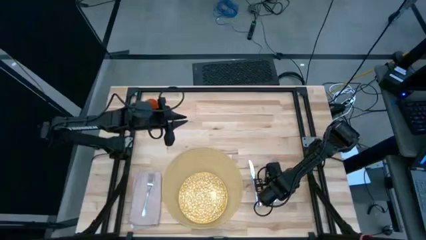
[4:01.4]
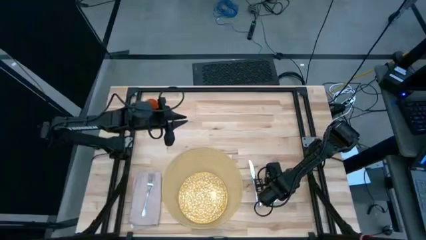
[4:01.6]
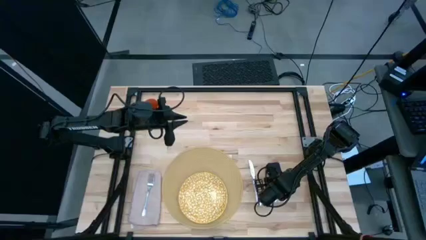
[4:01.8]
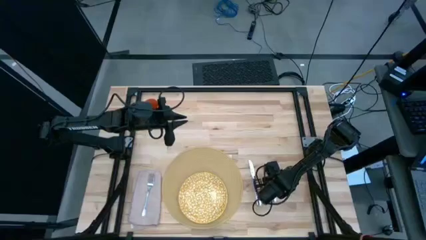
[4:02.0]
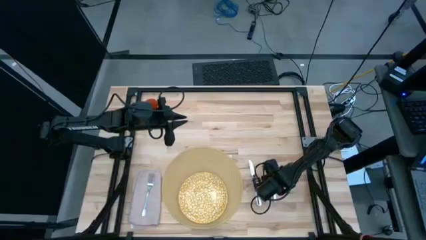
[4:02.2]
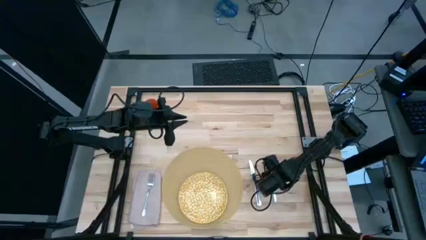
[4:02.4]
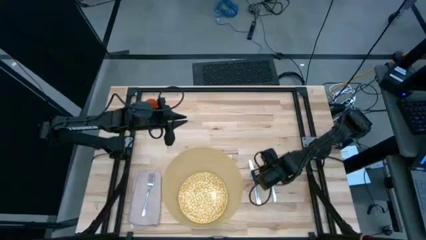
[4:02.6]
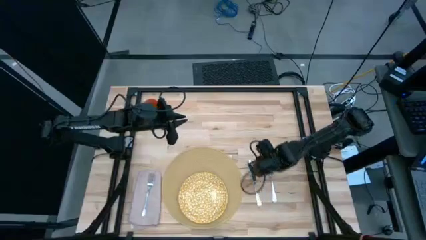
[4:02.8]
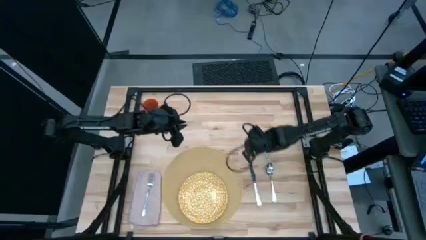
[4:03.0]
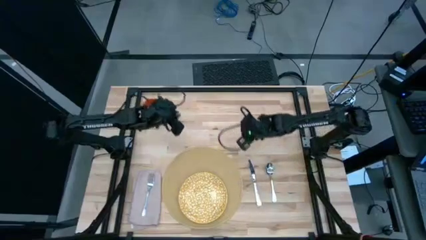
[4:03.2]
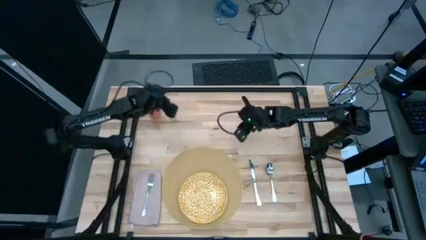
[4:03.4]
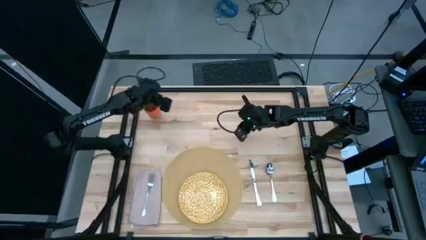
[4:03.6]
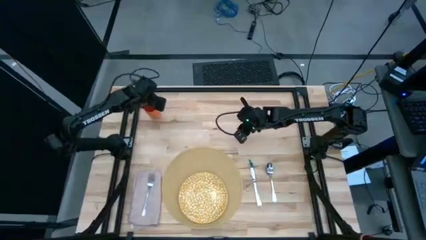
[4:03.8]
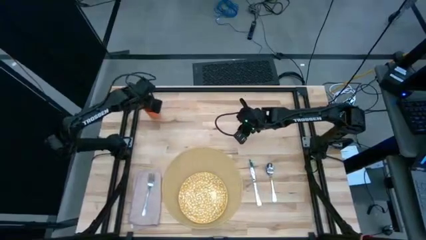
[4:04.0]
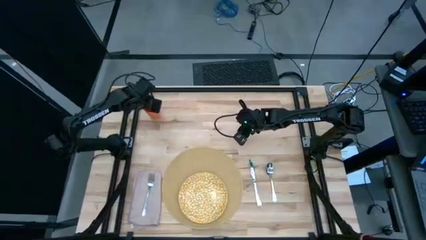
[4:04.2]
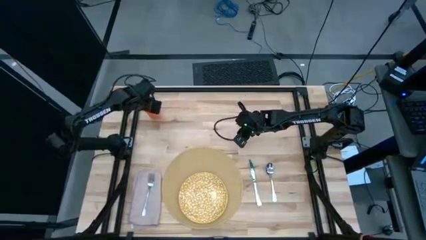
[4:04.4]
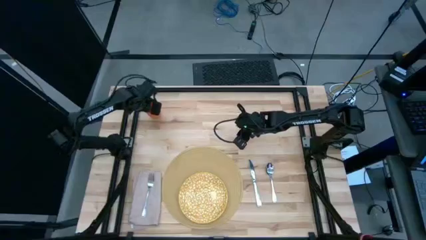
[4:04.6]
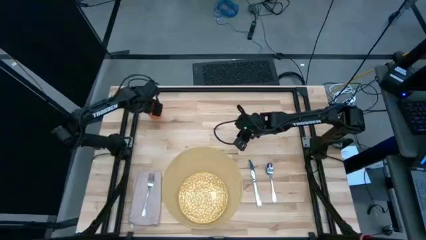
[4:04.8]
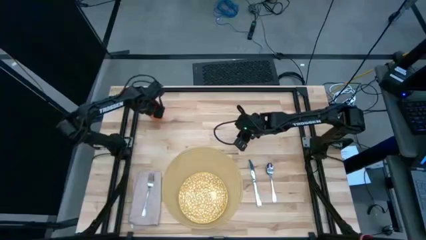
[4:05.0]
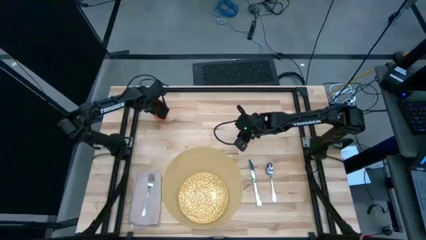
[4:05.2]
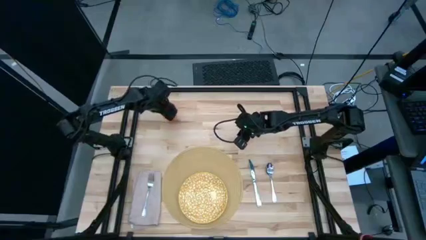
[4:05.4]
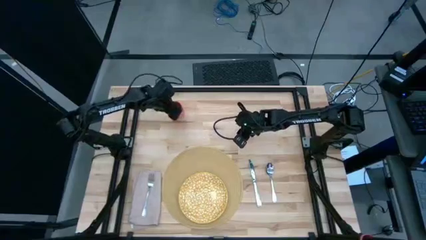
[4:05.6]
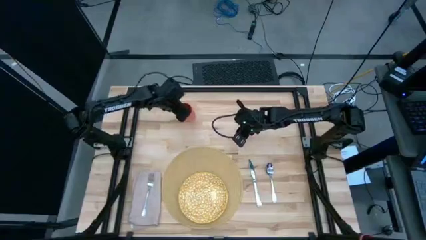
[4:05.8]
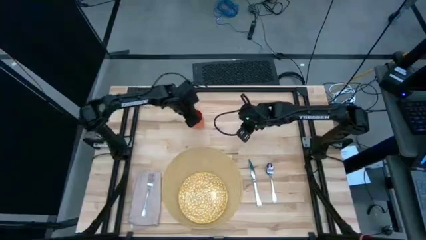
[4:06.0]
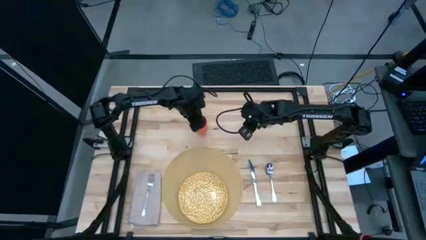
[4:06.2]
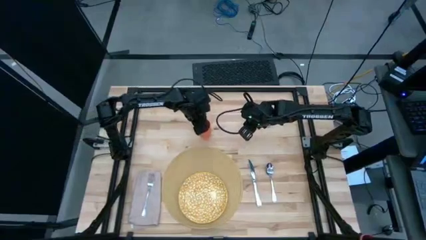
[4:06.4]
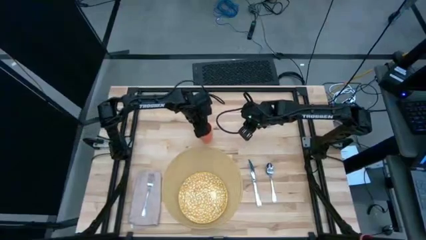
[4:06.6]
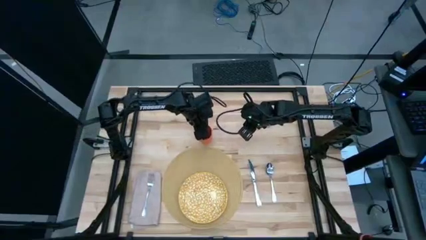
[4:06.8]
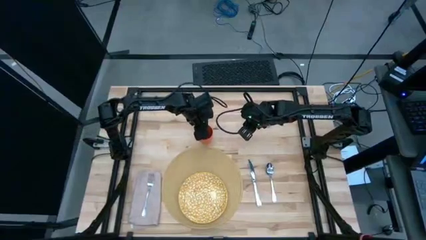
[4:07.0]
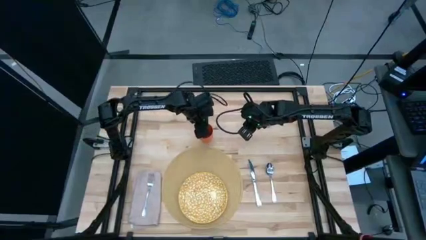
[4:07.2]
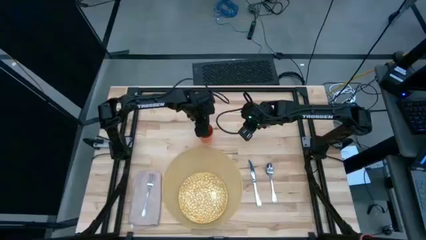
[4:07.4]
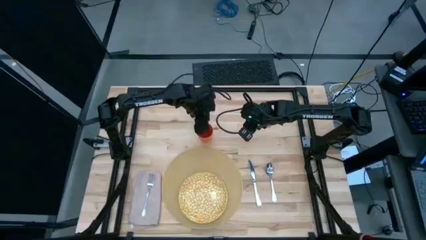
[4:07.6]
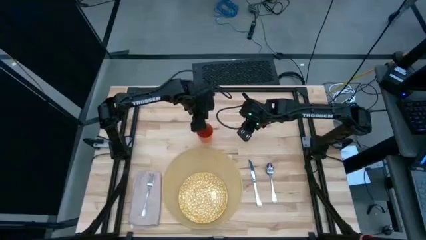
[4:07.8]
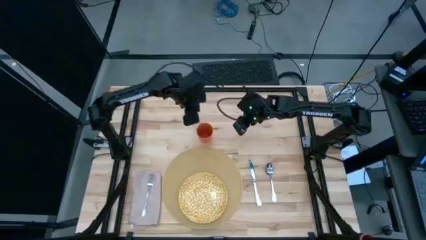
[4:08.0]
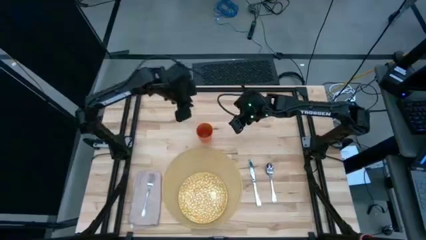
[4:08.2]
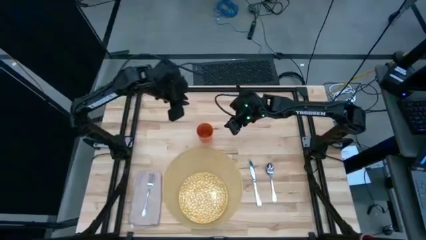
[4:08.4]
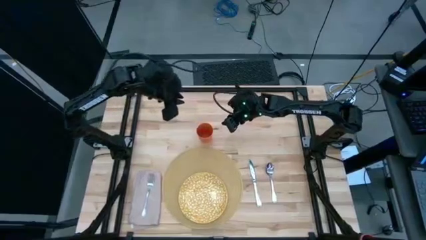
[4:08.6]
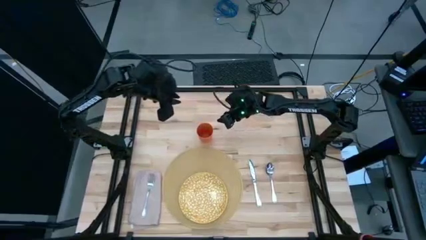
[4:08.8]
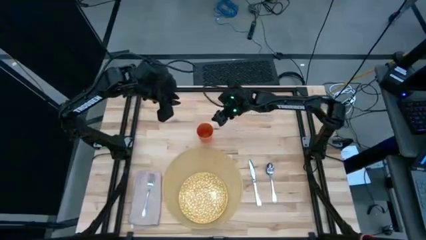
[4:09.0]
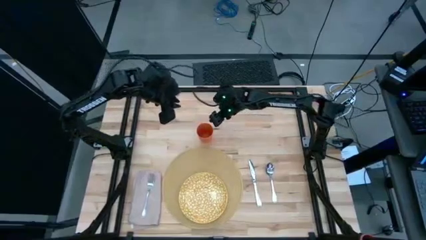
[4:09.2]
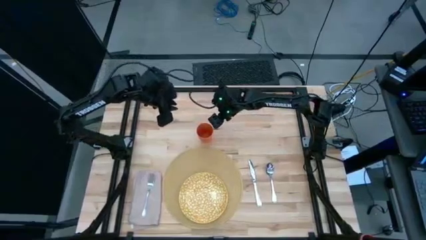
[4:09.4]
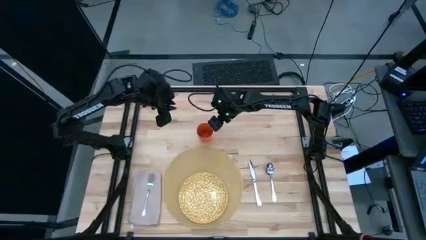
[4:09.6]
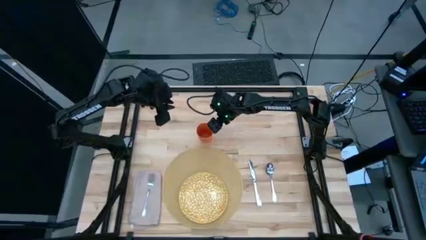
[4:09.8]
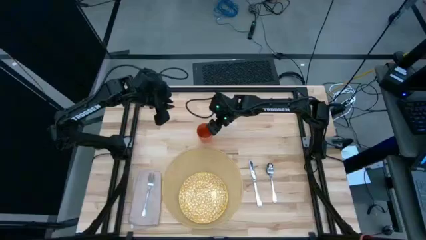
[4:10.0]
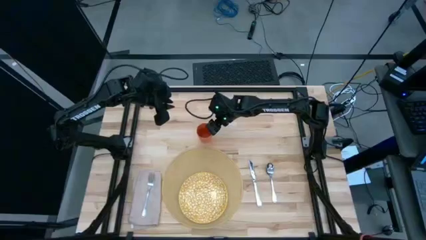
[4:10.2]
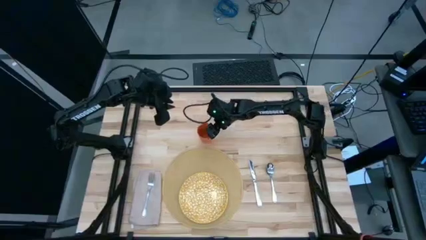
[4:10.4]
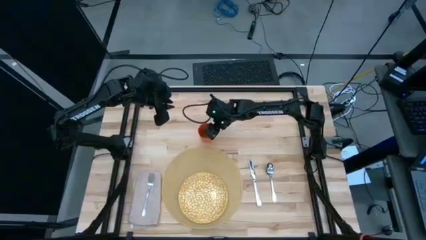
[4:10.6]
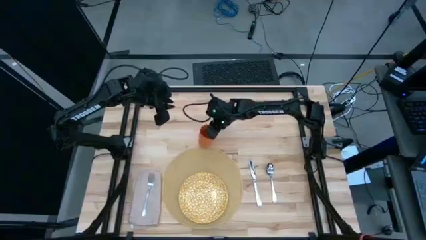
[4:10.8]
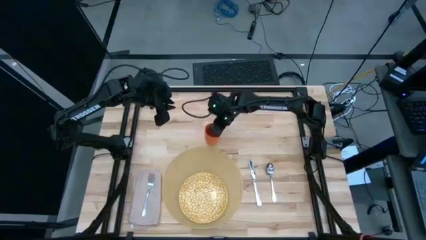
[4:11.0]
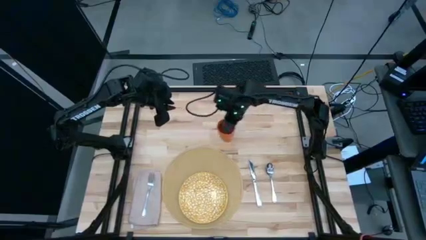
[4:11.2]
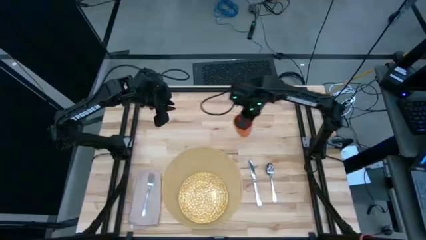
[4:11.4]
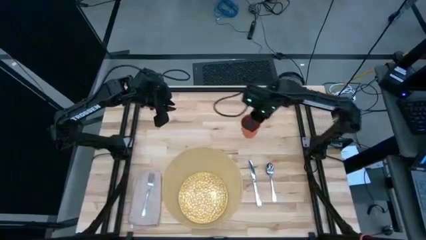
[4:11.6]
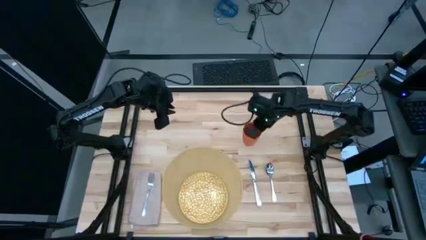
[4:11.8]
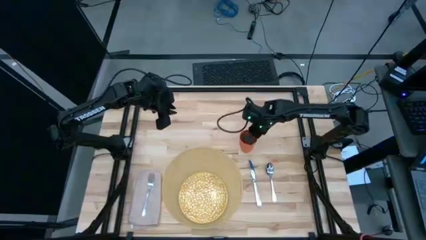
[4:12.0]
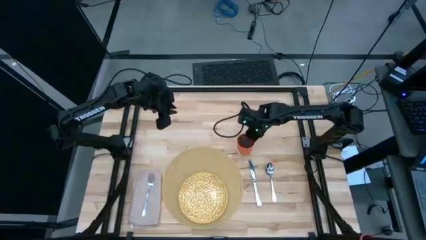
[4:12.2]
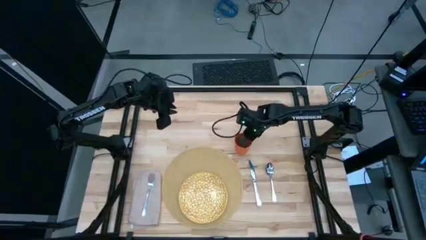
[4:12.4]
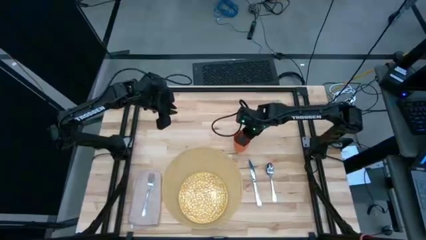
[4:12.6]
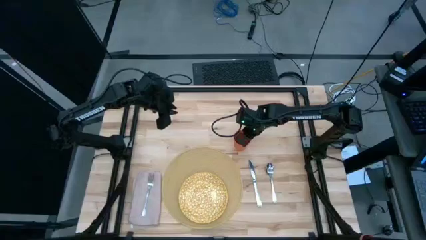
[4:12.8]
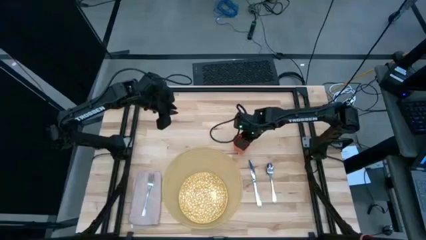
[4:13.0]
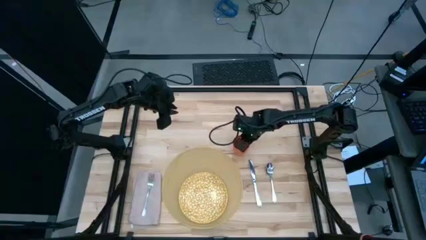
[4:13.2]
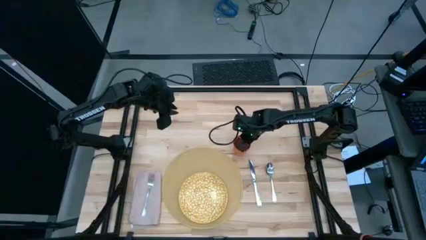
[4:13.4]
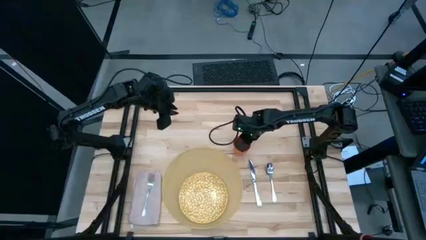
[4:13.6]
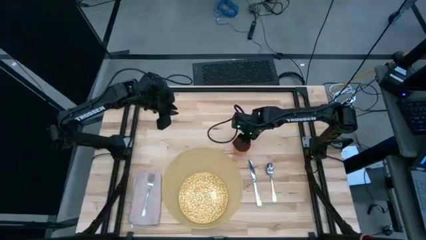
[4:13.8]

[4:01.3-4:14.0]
Task: Set table place
Put the orange cup to the top right of the light brown mat
